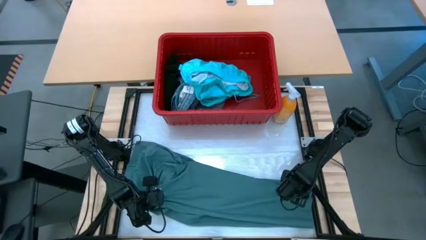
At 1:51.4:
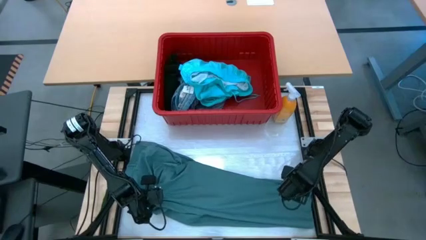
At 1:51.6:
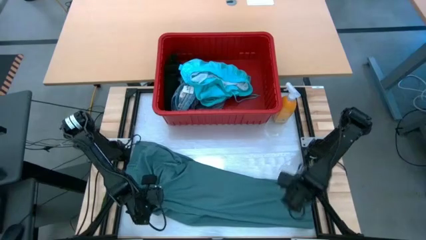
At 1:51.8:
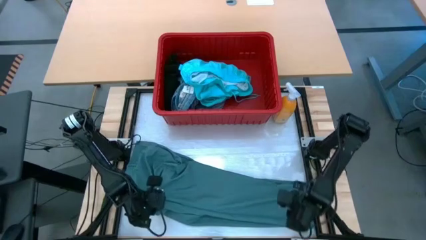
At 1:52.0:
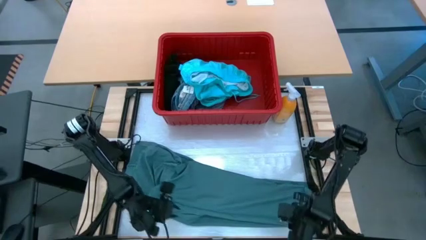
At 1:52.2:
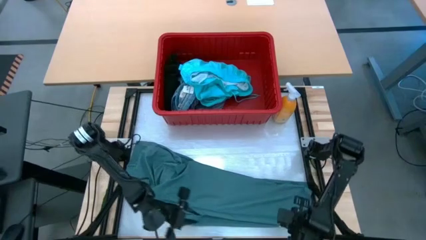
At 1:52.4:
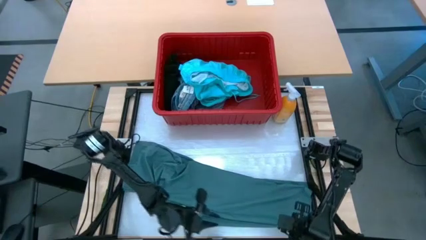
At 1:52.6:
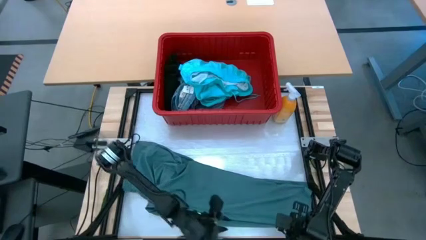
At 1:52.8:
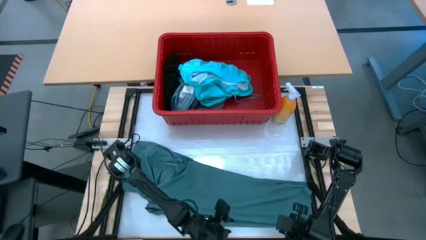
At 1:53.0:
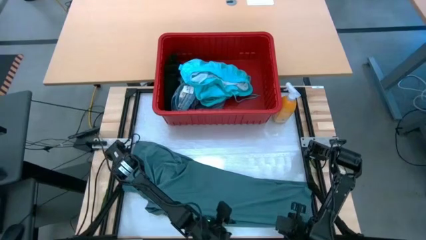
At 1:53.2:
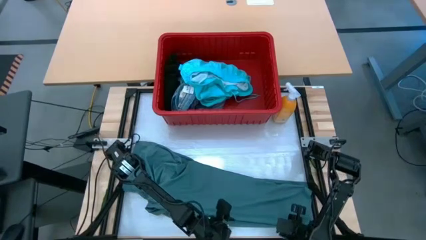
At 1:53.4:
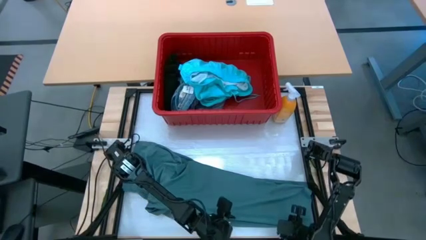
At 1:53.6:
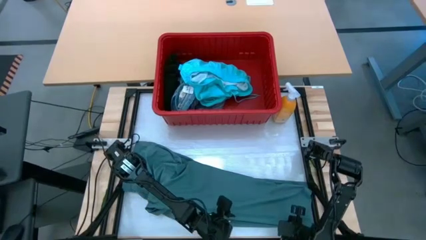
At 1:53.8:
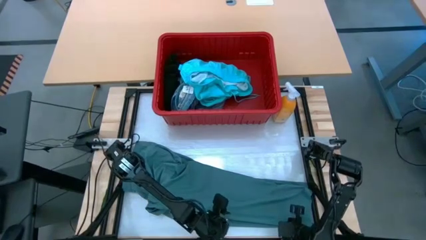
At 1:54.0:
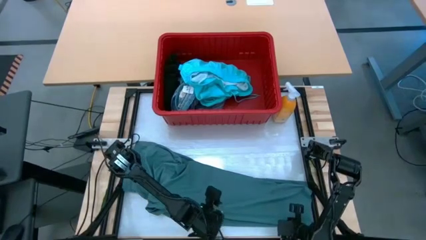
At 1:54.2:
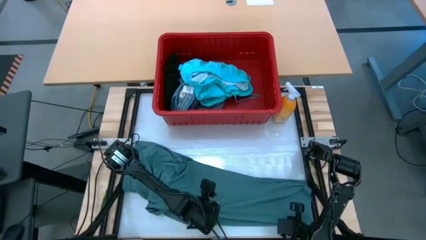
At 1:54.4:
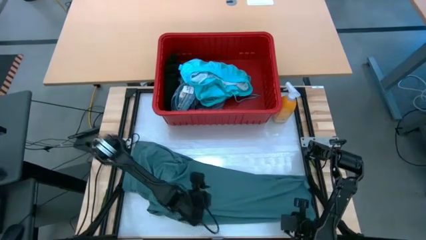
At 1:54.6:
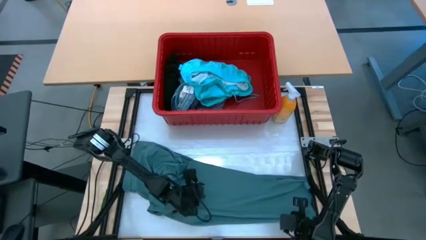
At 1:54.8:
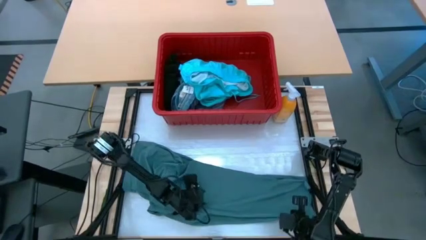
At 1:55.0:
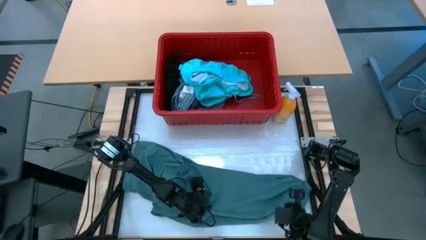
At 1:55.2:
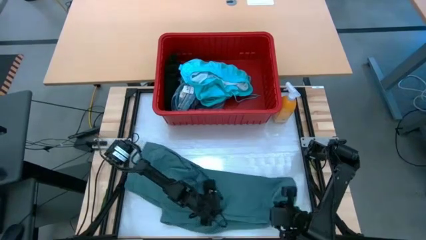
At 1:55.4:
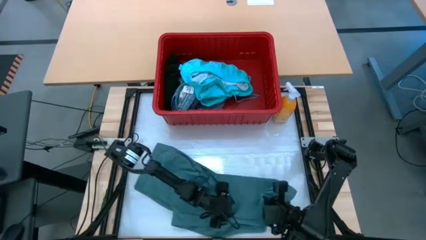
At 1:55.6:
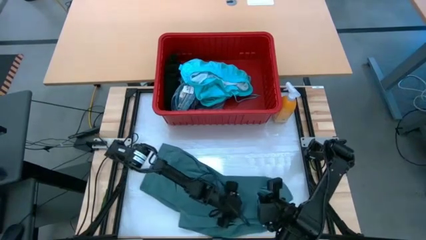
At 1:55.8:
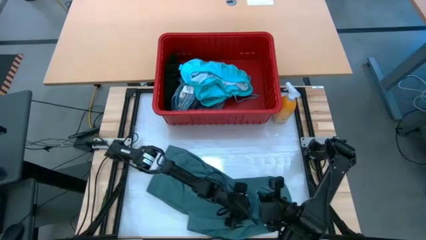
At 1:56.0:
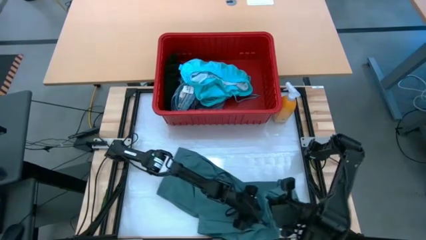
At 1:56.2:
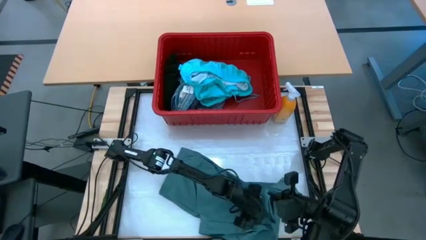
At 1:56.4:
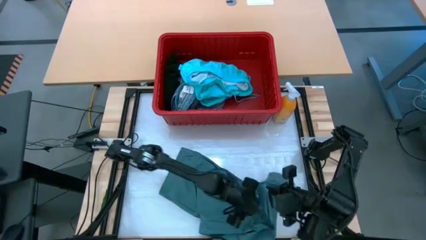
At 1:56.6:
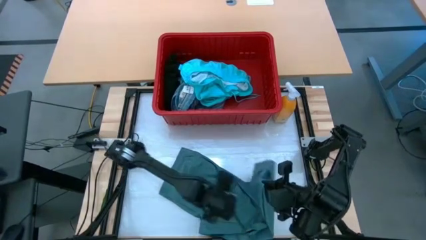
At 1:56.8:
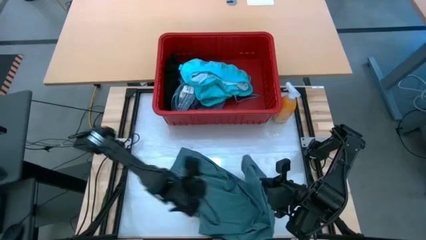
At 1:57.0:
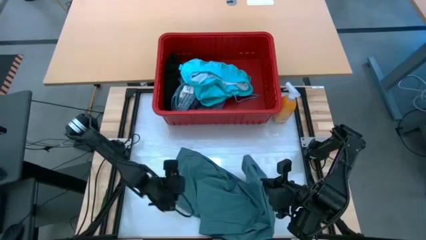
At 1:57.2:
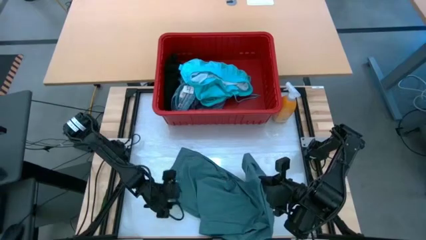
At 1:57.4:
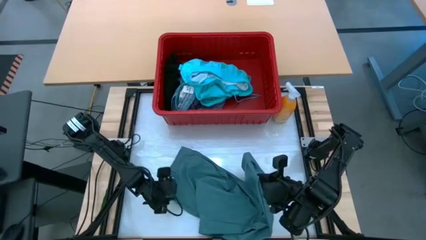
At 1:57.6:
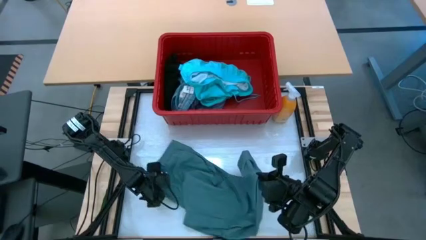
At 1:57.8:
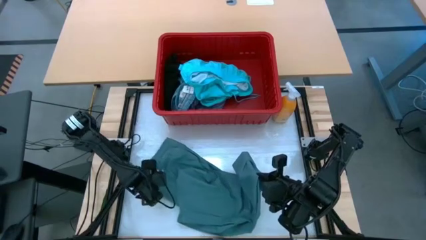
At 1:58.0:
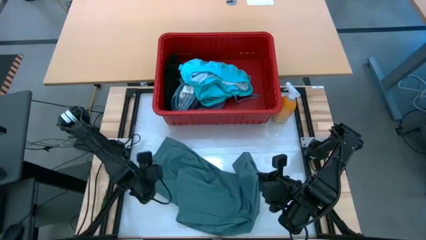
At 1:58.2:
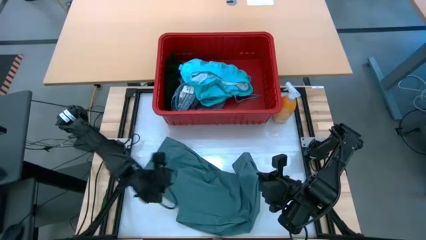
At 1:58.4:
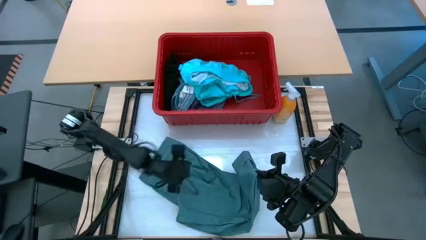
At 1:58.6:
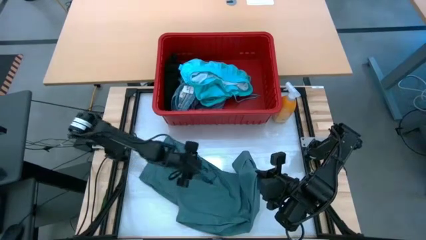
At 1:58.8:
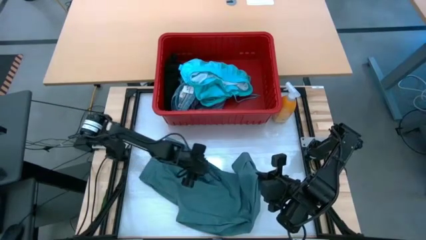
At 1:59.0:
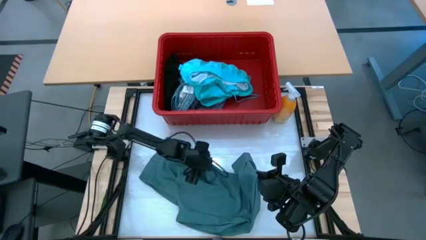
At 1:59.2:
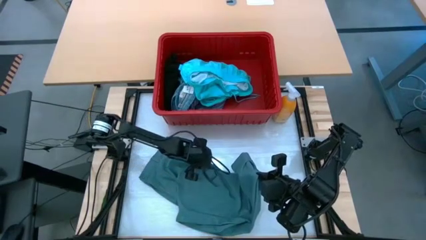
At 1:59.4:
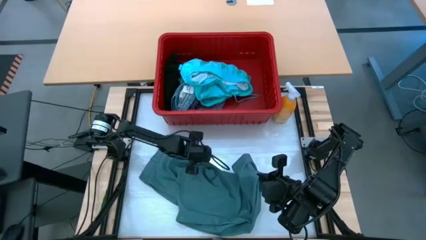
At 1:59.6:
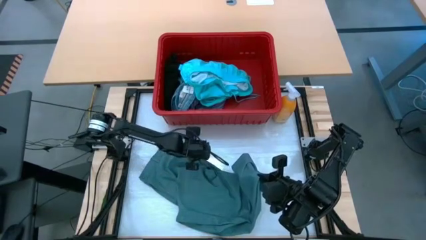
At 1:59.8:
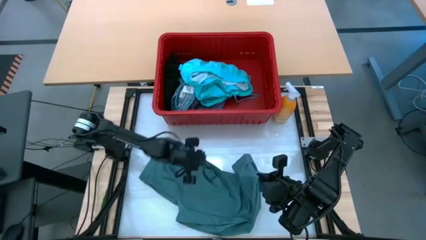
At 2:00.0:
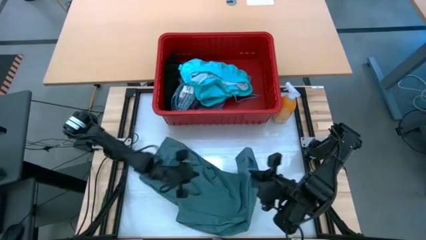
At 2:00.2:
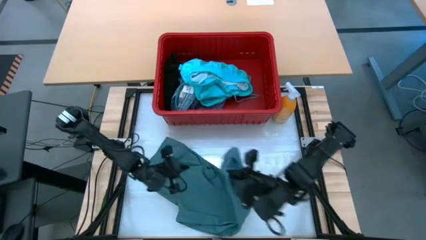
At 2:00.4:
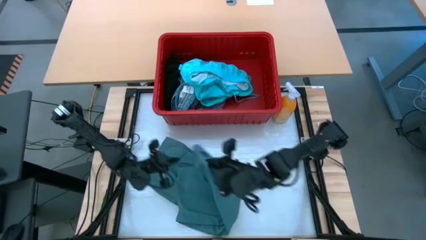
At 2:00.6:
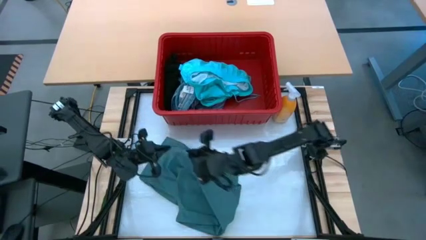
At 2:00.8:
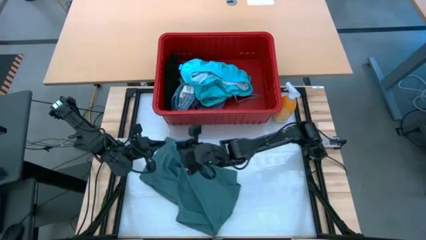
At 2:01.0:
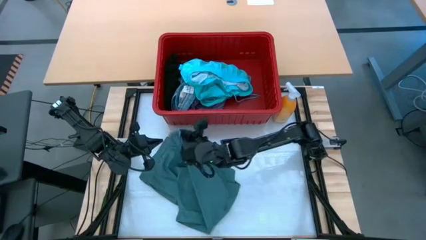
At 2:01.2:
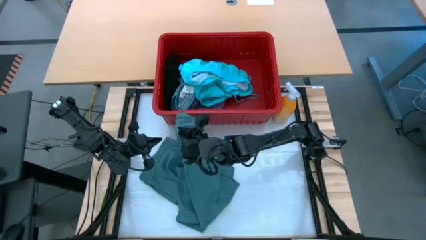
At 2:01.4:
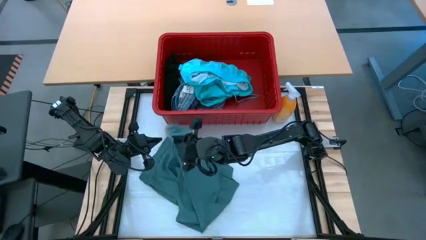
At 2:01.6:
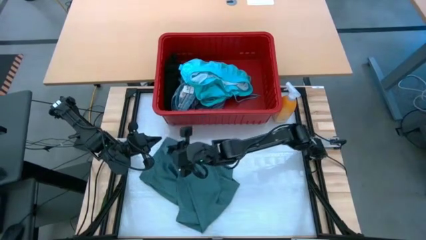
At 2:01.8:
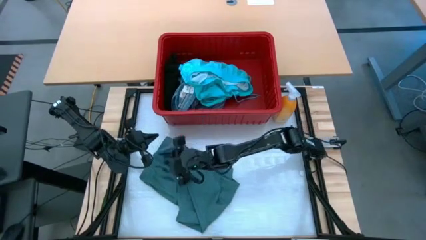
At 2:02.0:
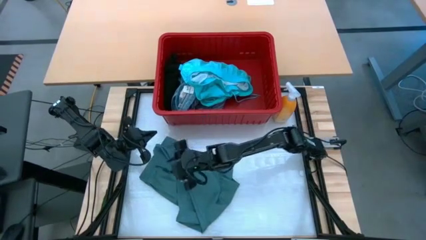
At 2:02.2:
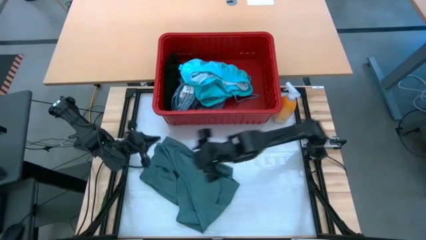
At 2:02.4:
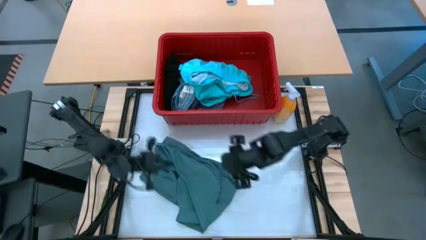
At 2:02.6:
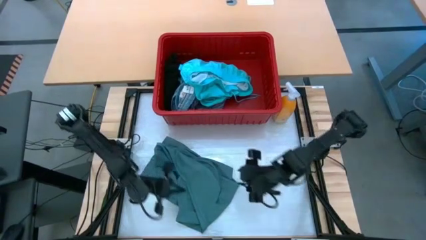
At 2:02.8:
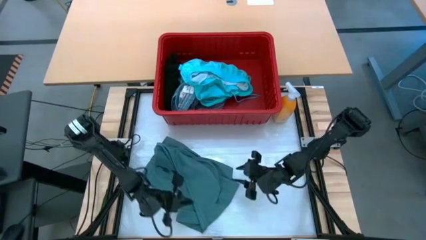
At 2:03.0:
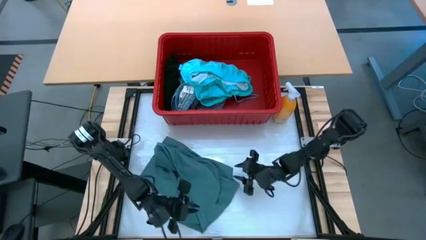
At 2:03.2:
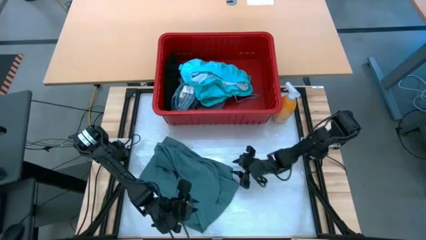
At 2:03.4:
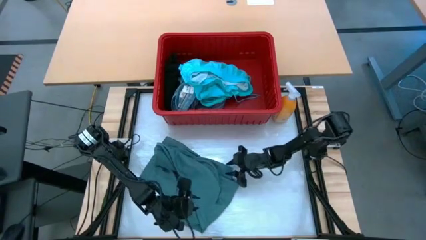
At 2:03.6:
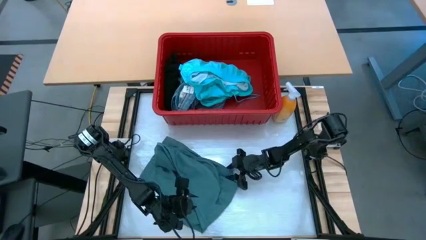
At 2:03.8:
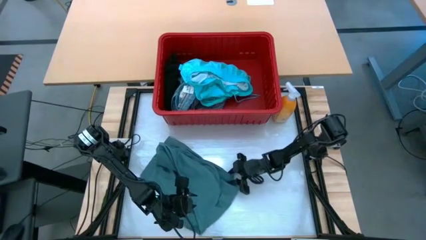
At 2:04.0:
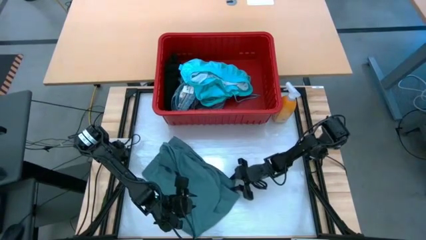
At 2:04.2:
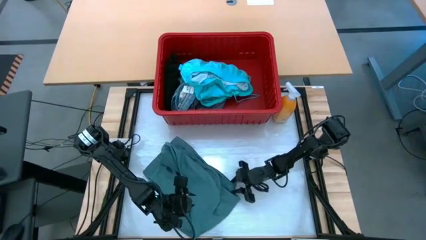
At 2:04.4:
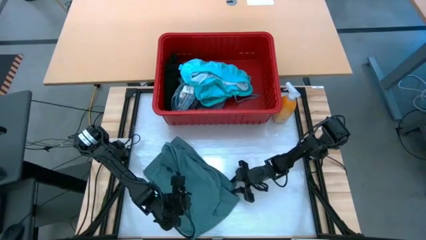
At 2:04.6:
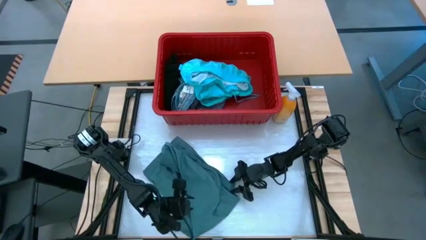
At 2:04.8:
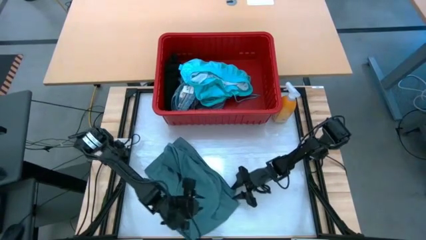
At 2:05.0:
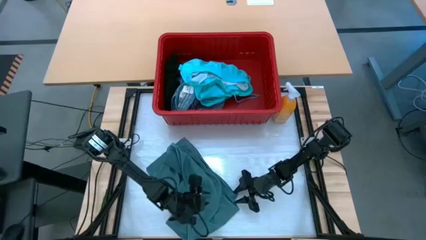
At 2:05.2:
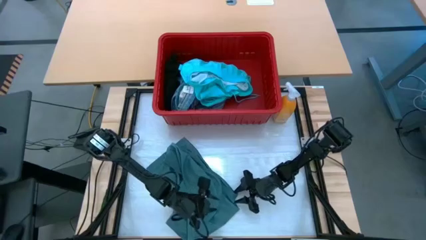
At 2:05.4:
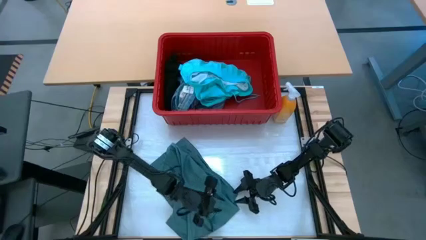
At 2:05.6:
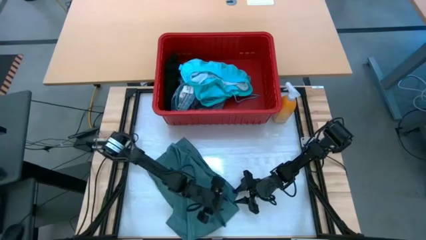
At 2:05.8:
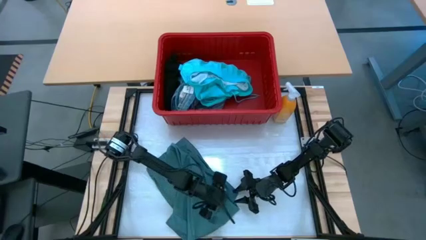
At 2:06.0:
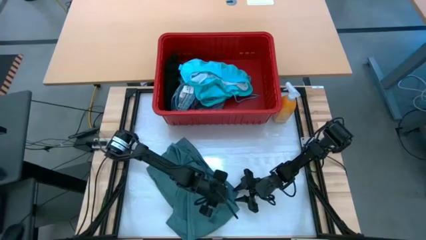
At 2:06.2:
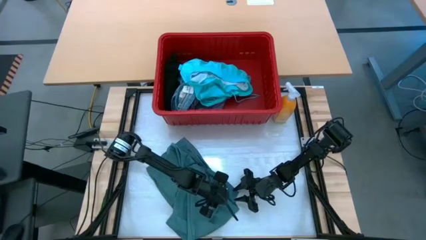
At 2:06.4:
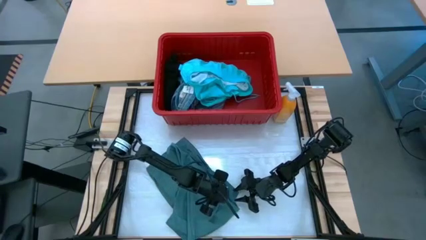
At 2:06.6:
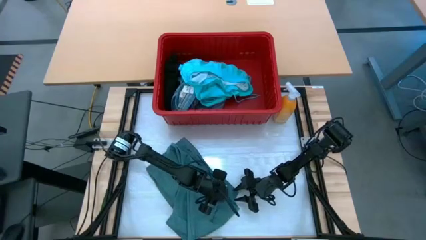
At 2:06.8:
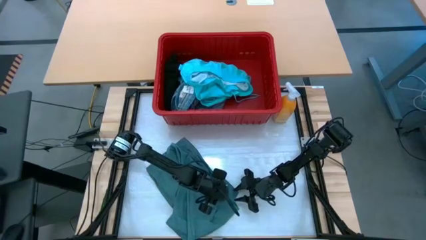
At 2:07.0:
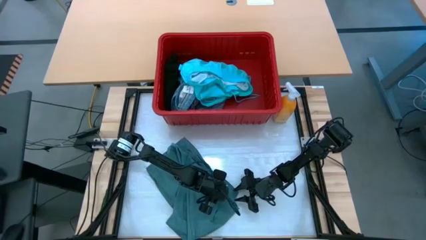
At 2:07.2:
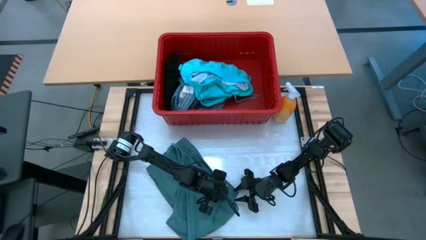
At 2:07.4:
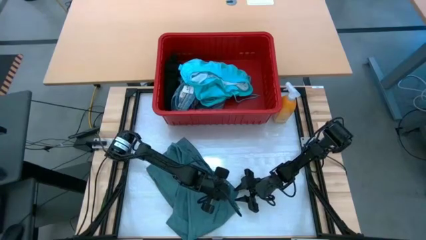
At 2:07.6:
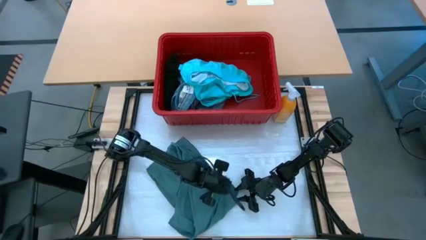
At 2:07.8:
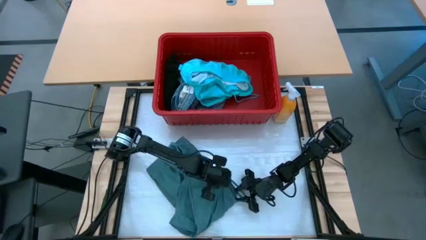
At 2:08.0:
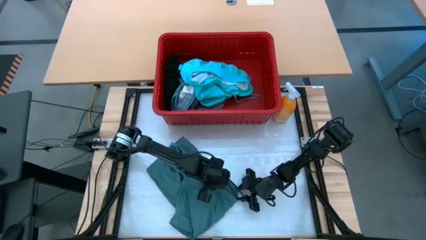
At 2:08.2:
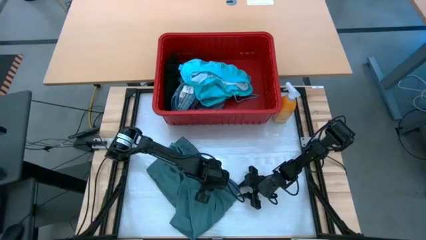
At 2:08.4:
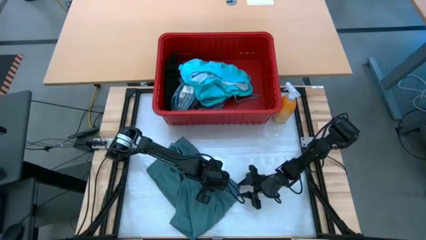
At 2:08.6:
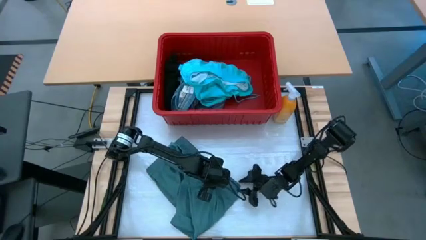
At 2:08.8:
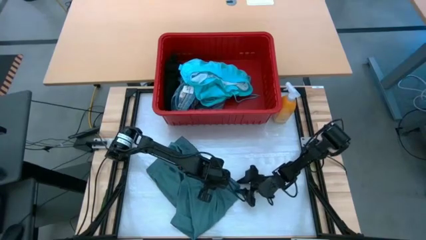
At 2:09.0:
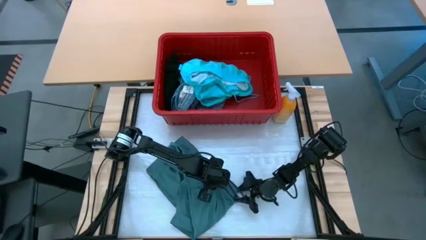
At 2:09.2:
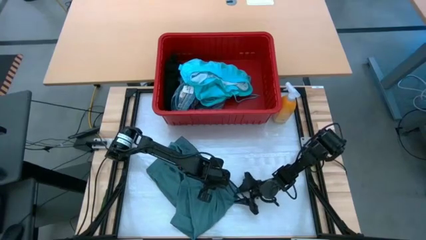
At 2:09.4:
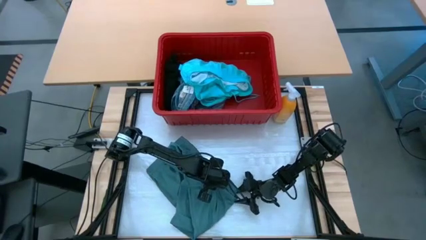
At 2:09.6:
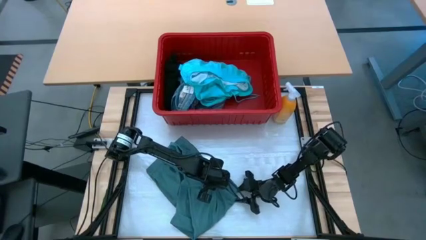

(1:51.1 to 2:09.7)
Task: Fold Laundry from Bin
Fold the light blue pants
